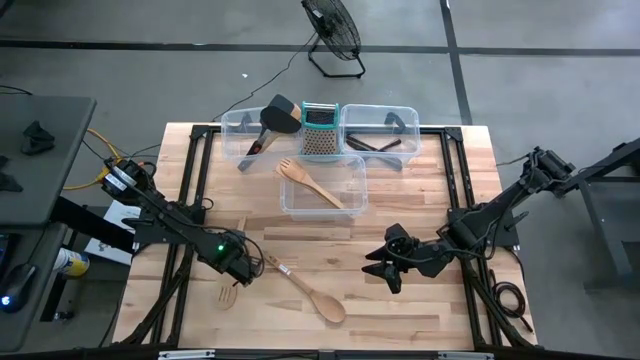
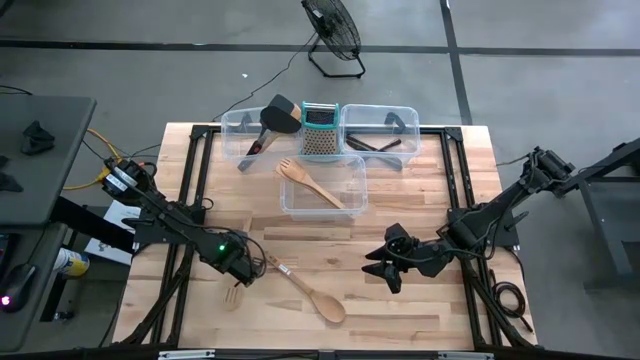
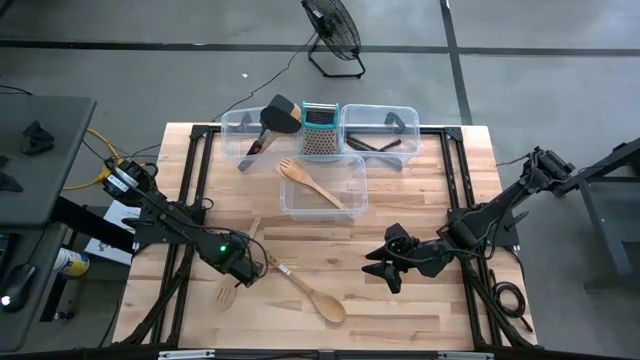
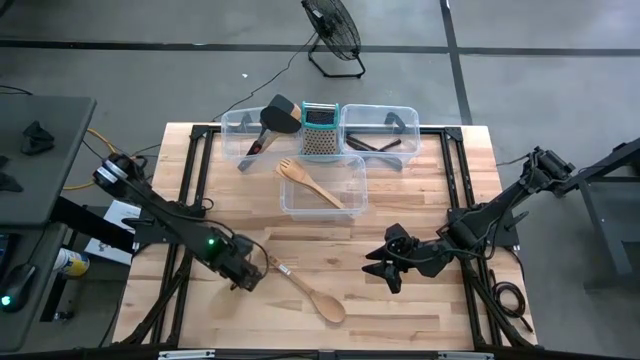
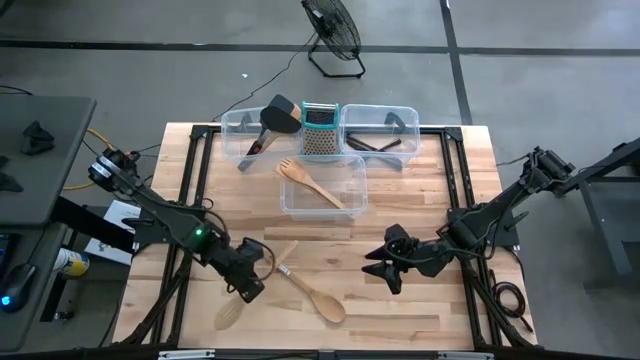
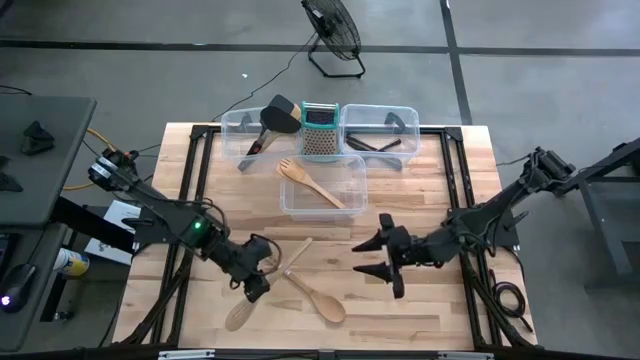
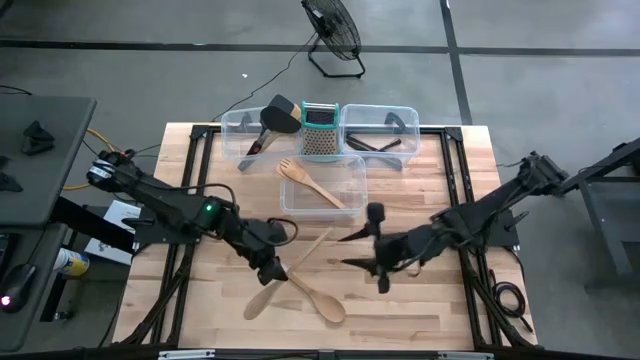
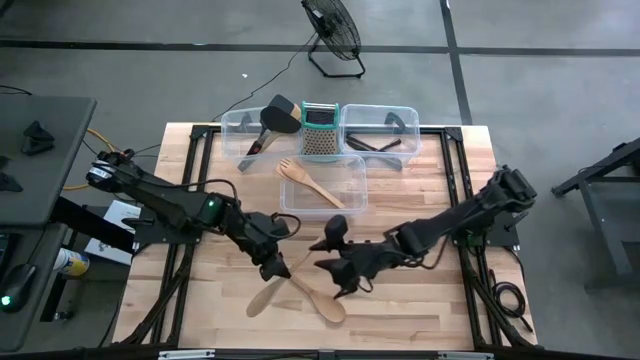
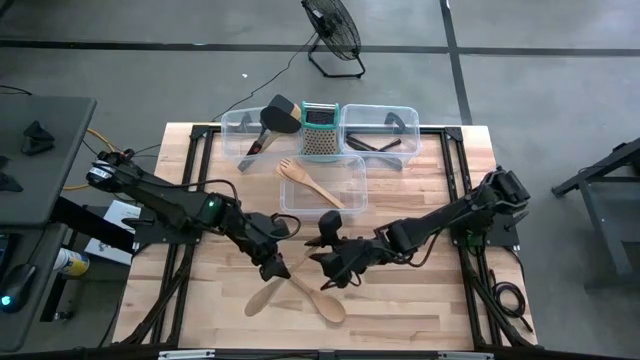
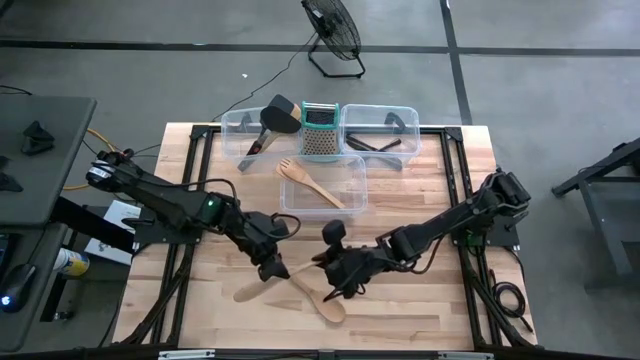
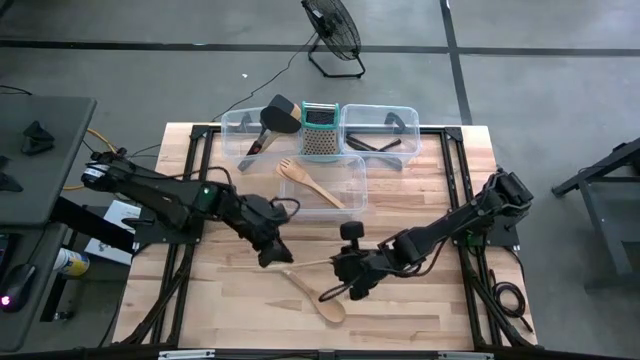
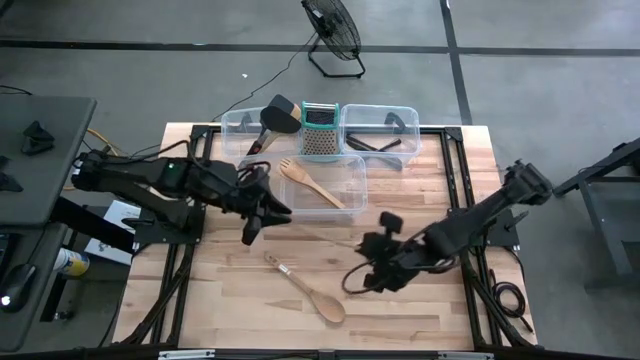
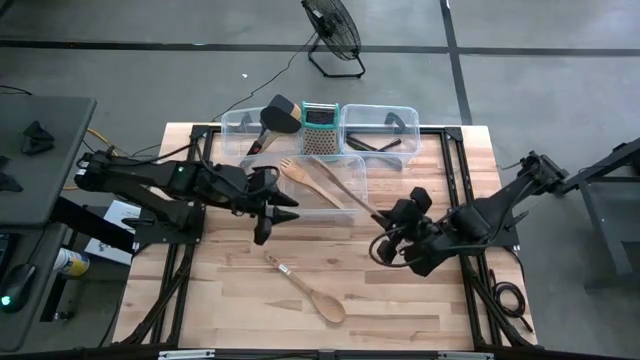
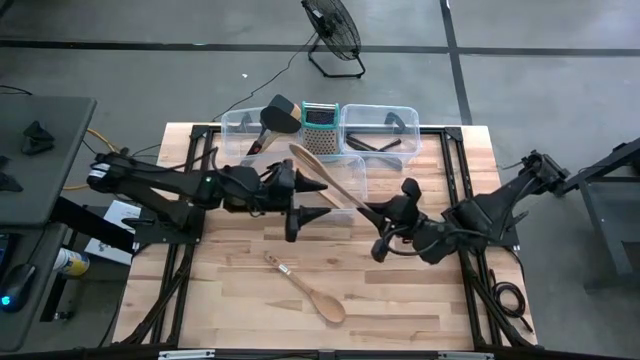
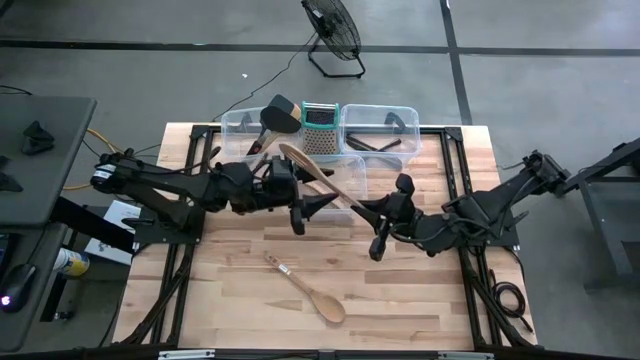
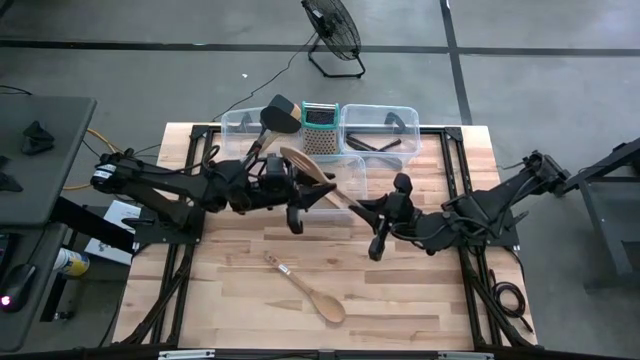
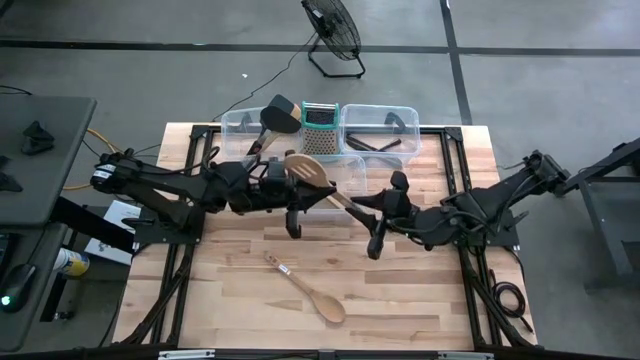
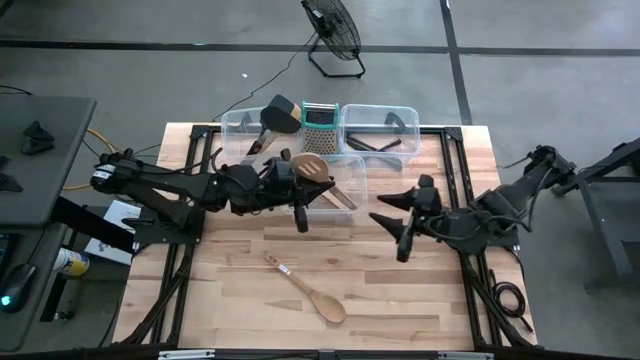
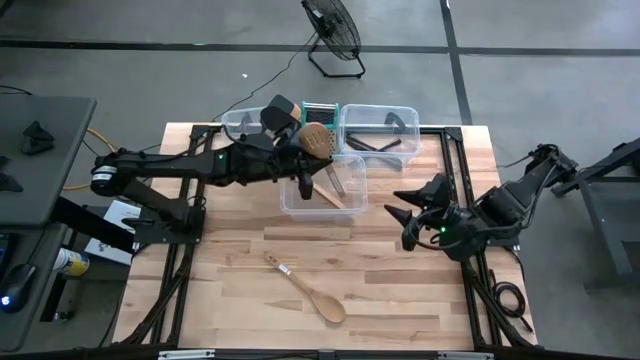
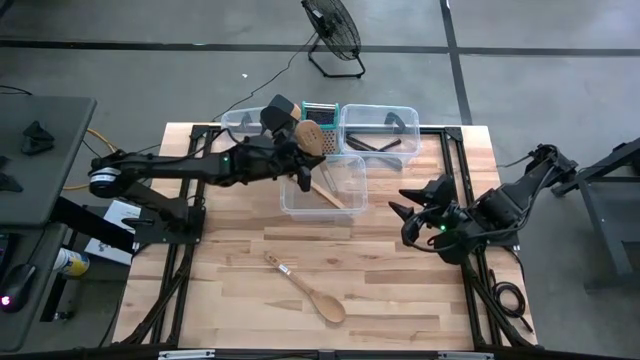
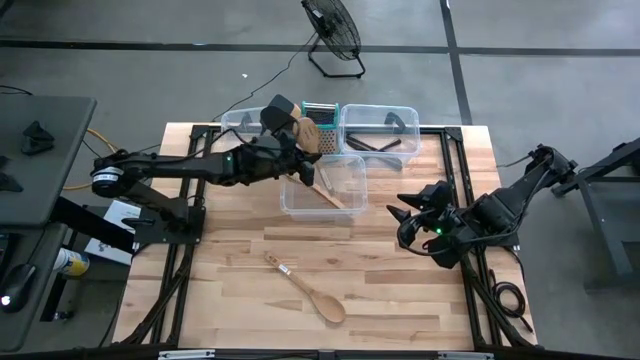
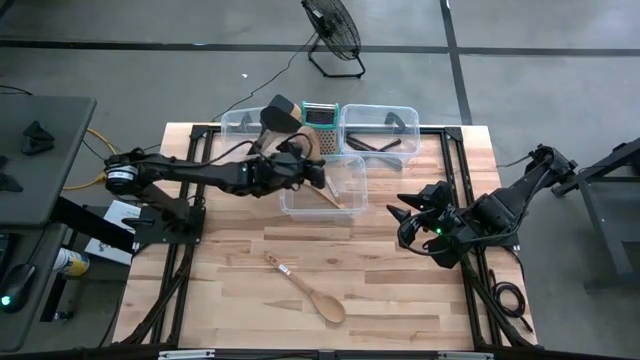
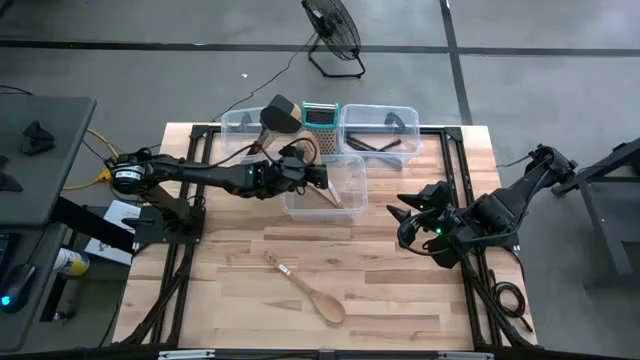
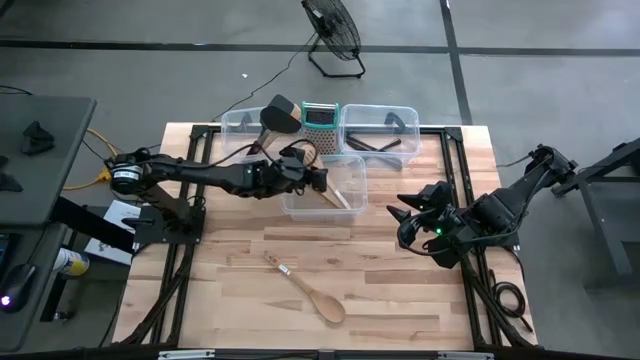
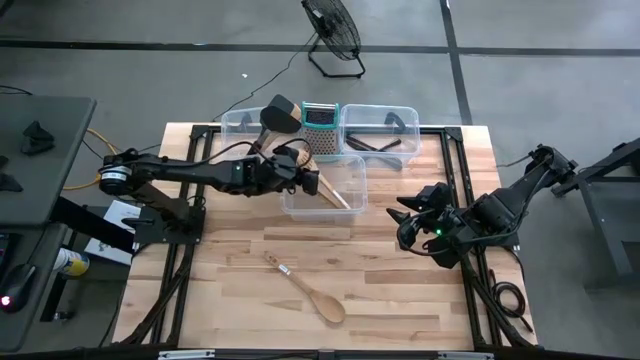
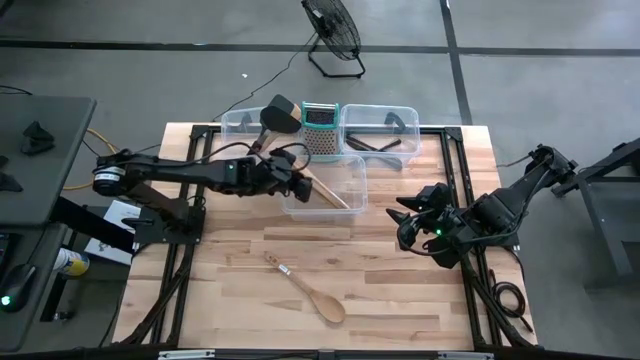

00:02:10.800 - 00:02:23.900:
Task: Pick & Place Kitchen Items
Put the light brown slotted spoon into the middle transparent bin

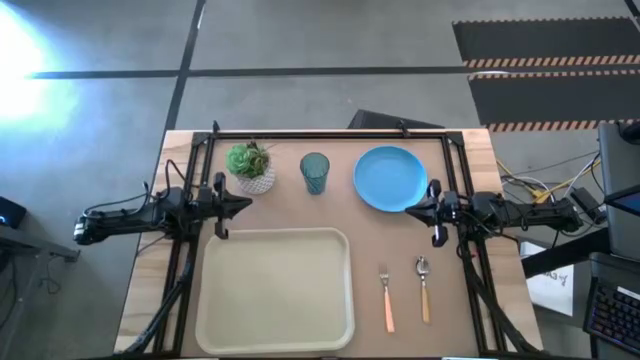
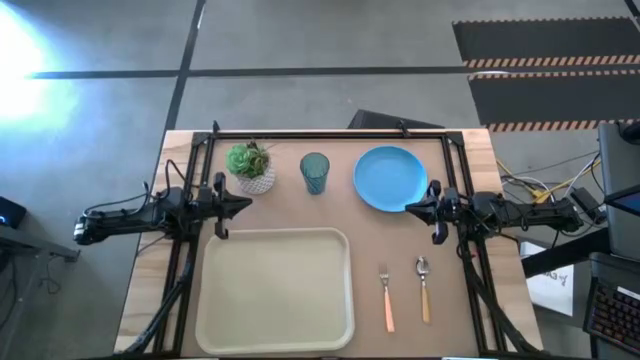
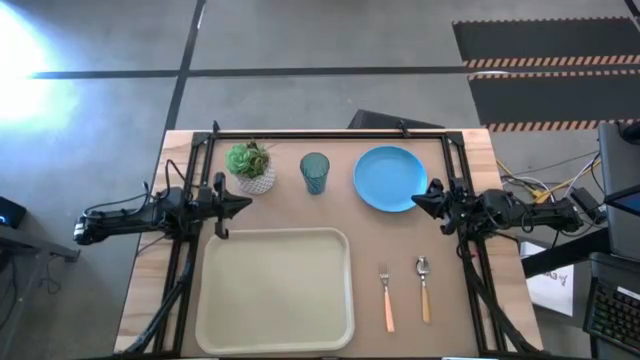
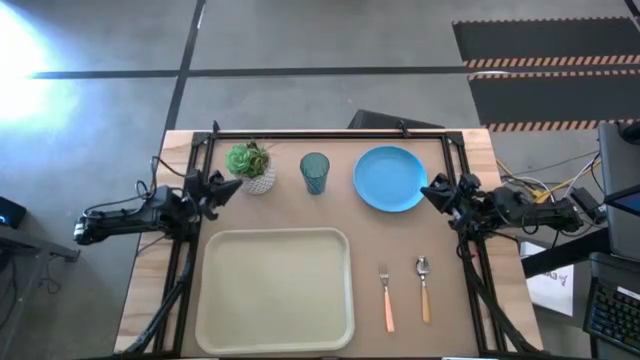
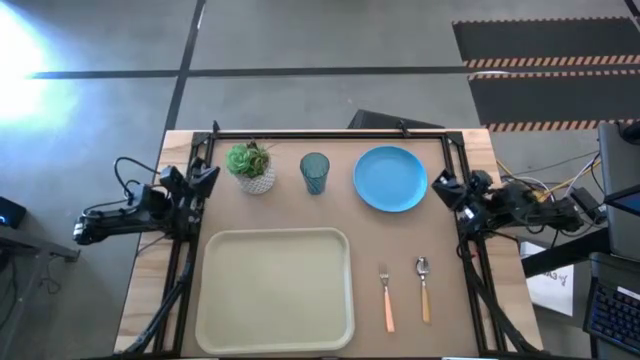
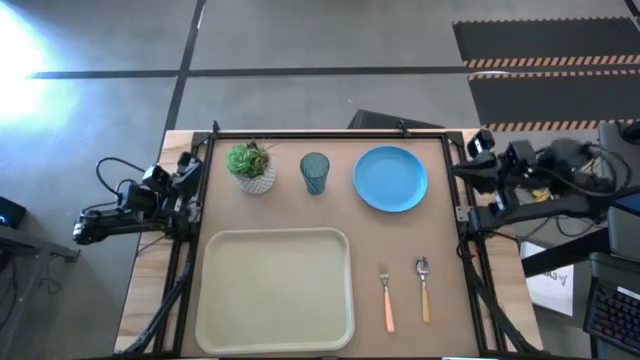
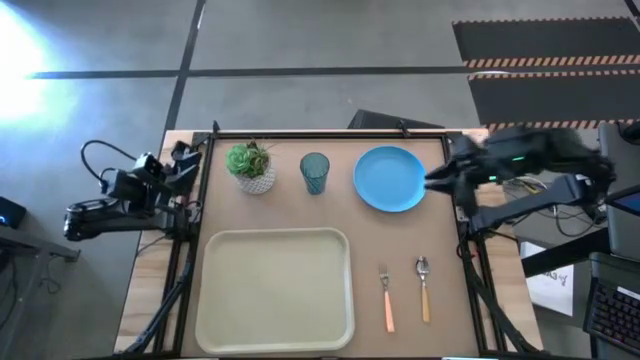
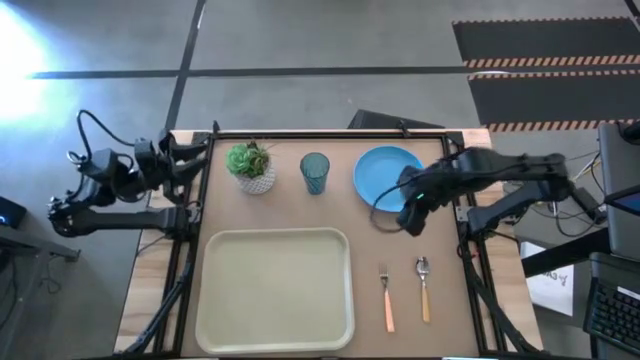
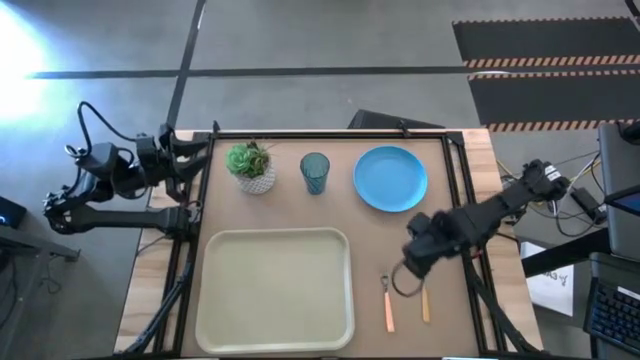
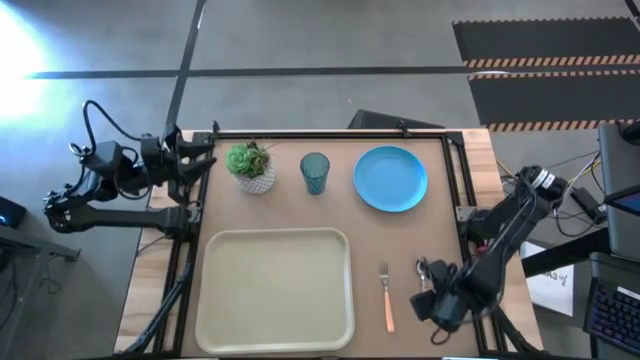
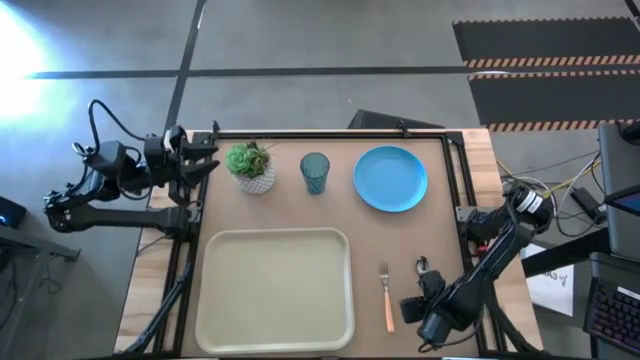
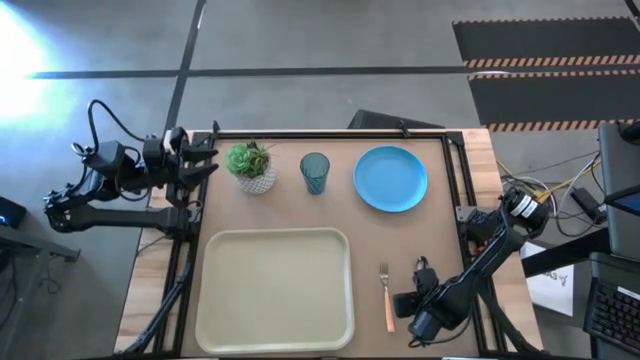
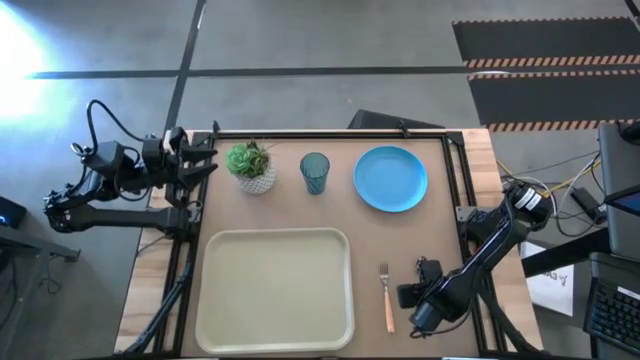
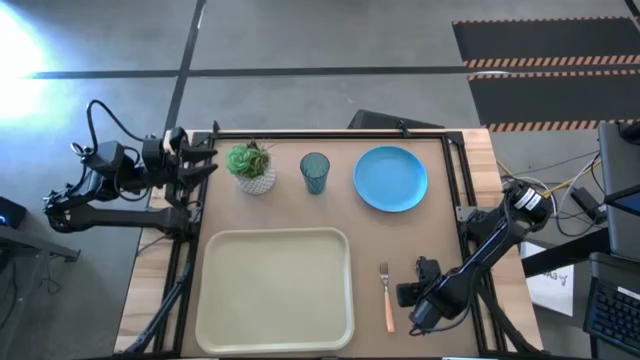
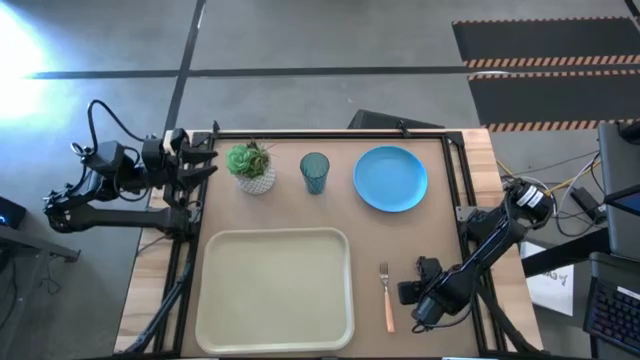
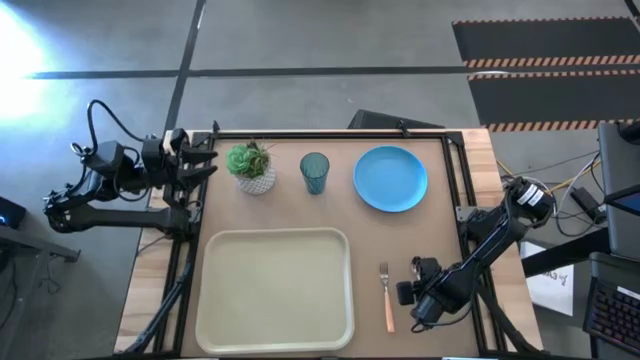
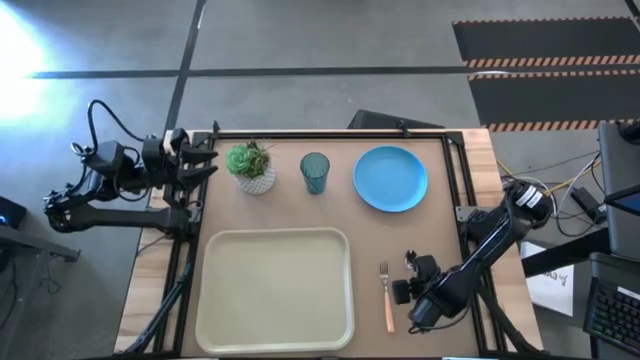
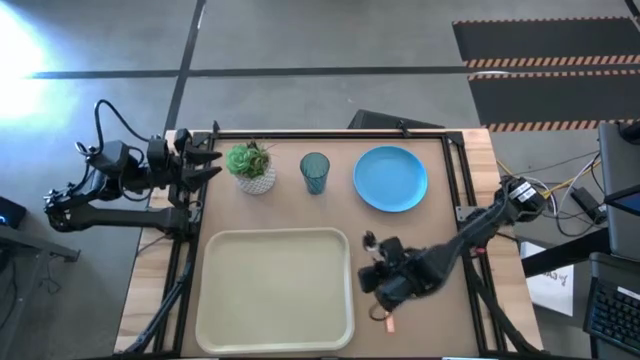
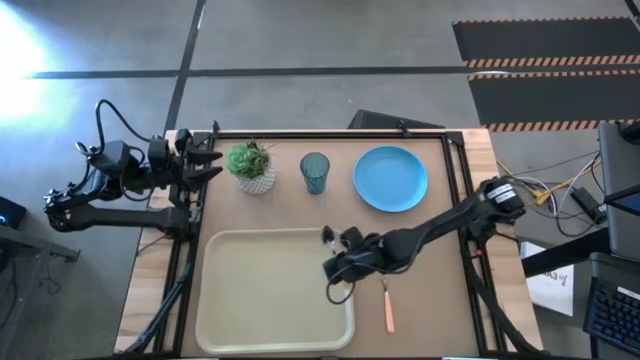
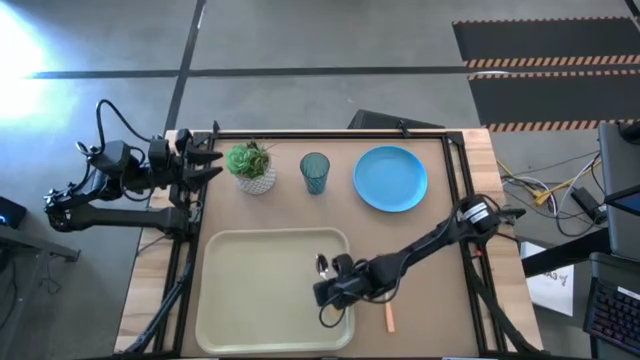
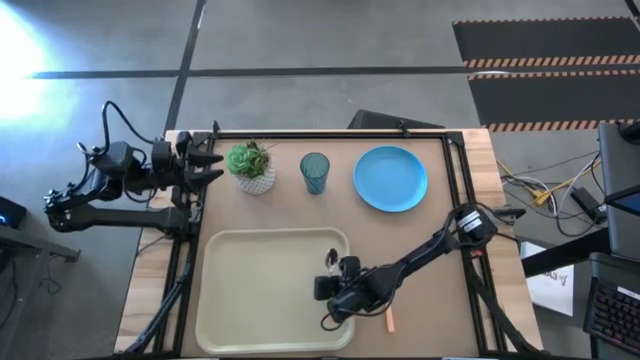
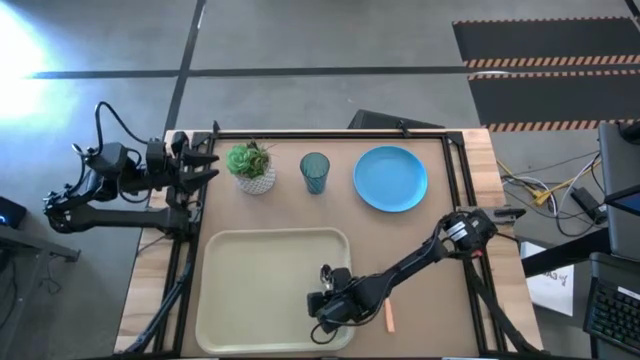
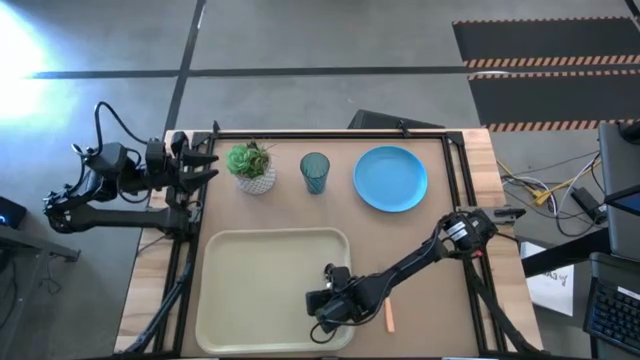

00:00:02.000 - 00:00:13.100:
Task: Pick and place plate/cup/fork/spoon on tray
Put the brown spoon on the gray tray
